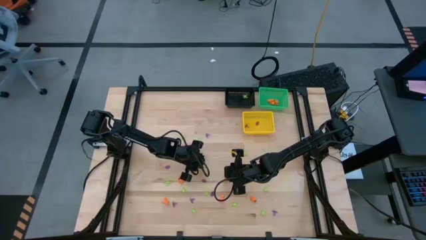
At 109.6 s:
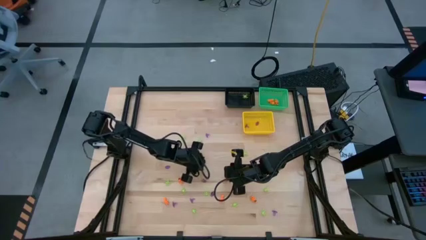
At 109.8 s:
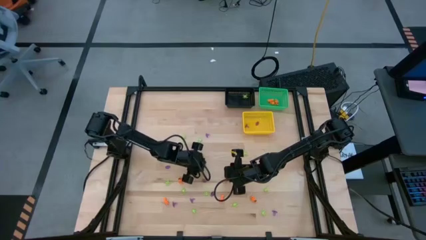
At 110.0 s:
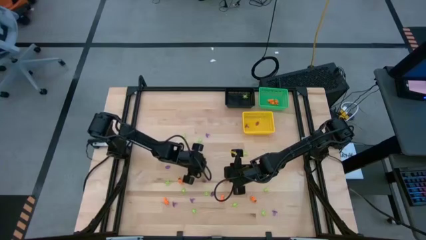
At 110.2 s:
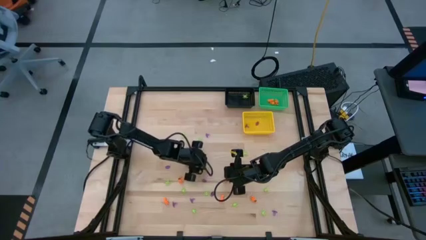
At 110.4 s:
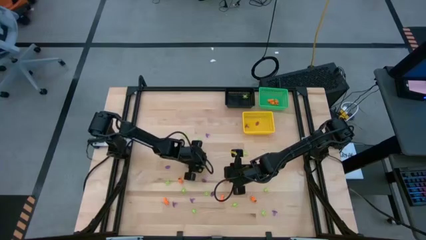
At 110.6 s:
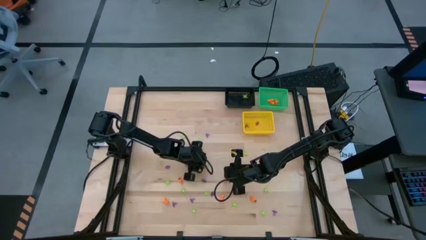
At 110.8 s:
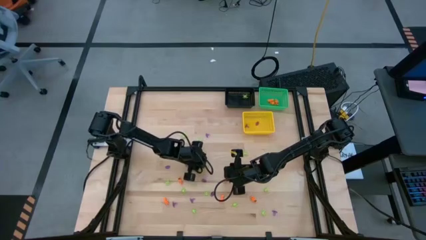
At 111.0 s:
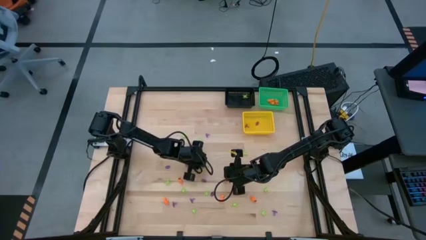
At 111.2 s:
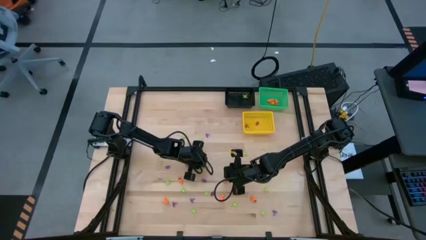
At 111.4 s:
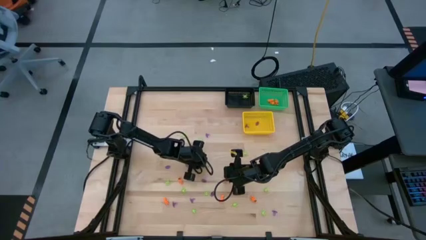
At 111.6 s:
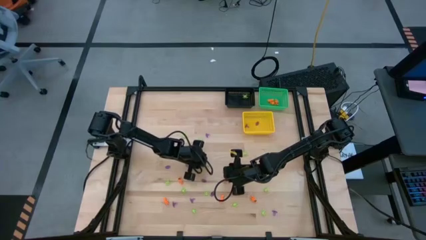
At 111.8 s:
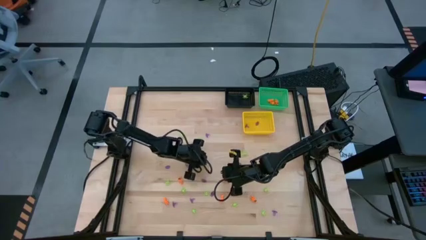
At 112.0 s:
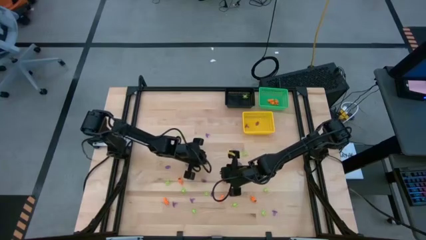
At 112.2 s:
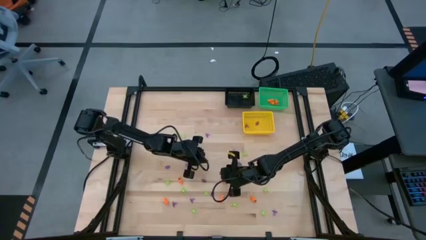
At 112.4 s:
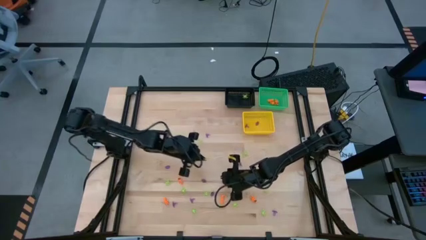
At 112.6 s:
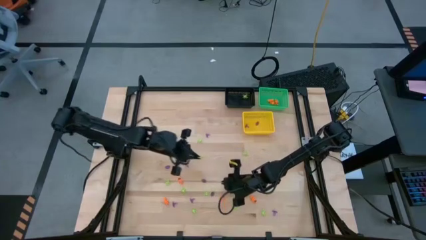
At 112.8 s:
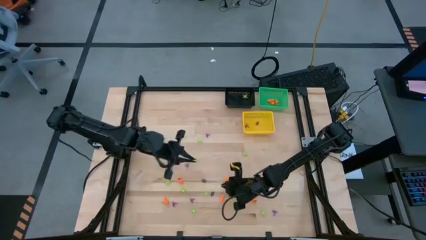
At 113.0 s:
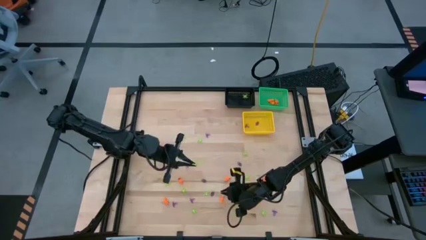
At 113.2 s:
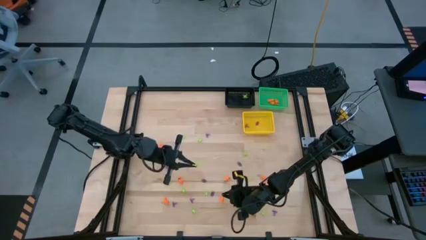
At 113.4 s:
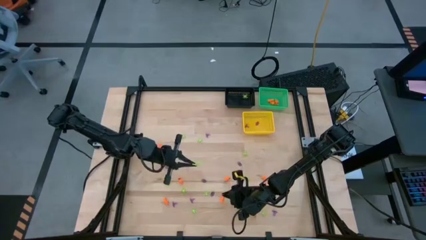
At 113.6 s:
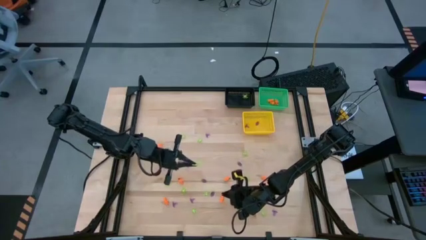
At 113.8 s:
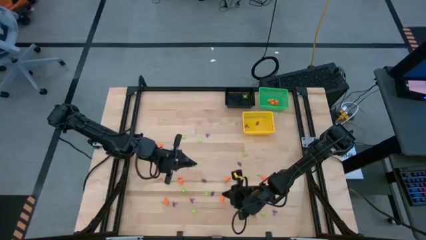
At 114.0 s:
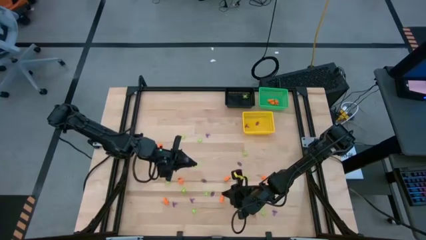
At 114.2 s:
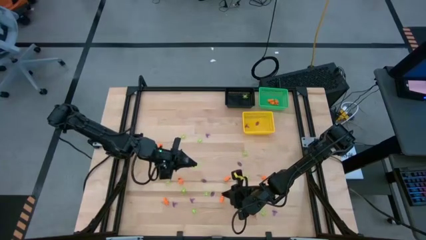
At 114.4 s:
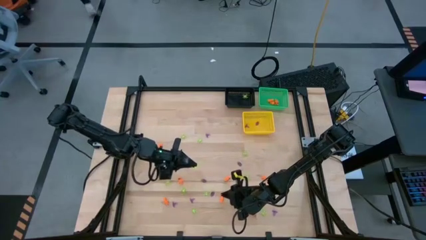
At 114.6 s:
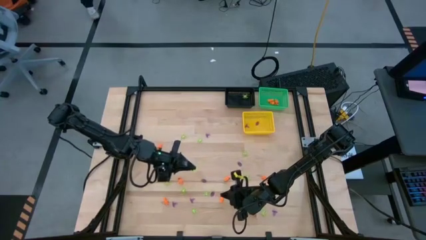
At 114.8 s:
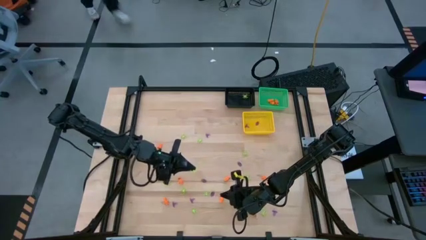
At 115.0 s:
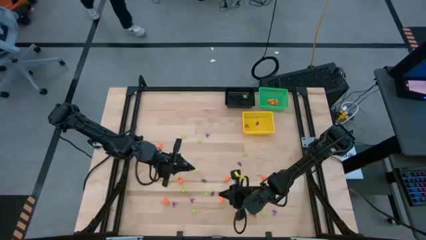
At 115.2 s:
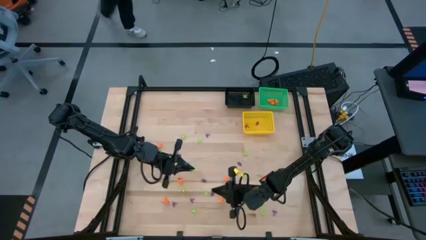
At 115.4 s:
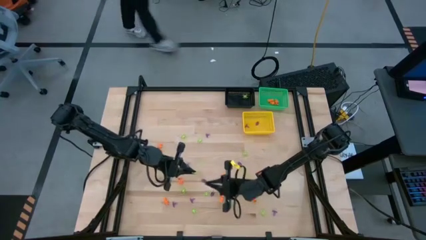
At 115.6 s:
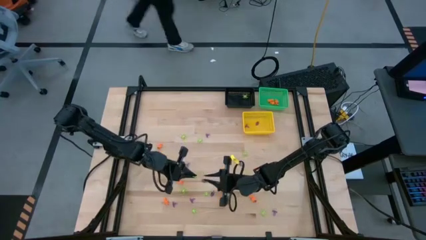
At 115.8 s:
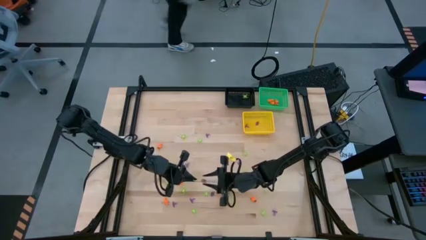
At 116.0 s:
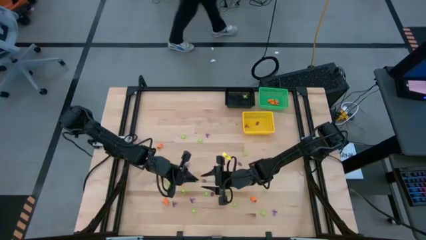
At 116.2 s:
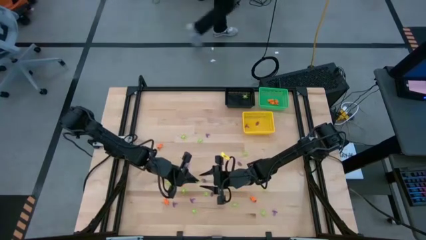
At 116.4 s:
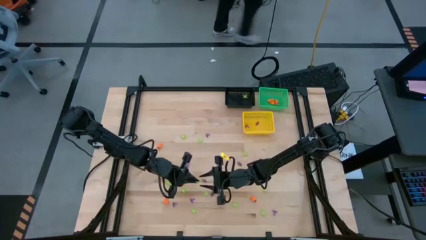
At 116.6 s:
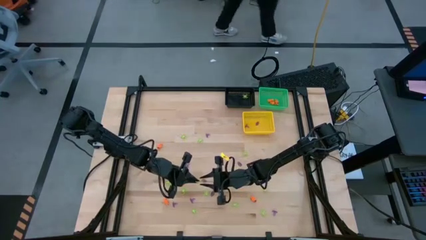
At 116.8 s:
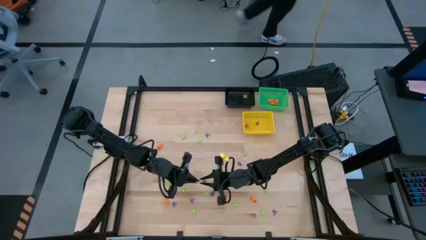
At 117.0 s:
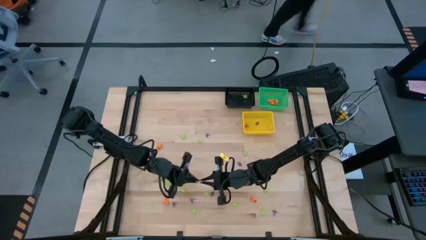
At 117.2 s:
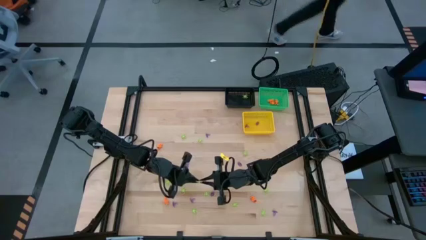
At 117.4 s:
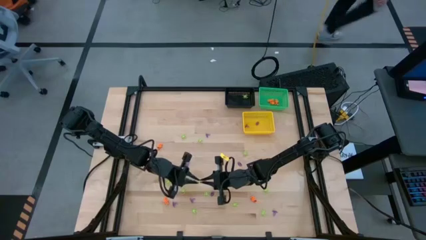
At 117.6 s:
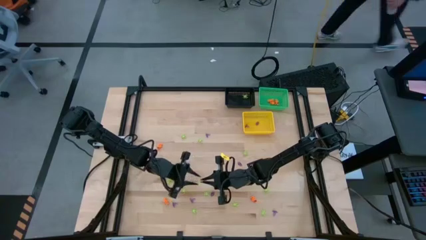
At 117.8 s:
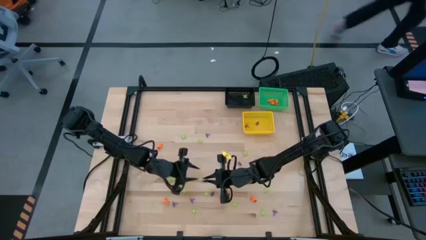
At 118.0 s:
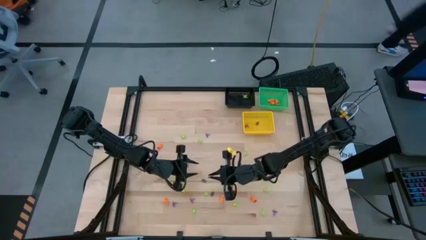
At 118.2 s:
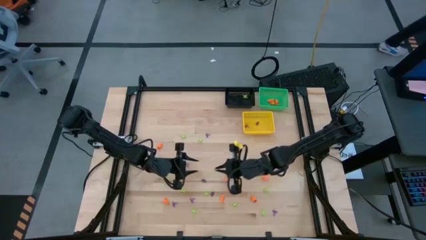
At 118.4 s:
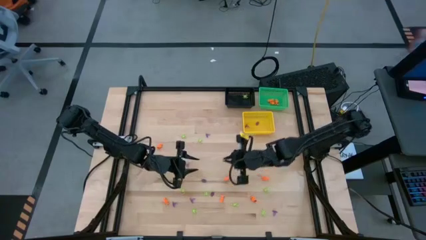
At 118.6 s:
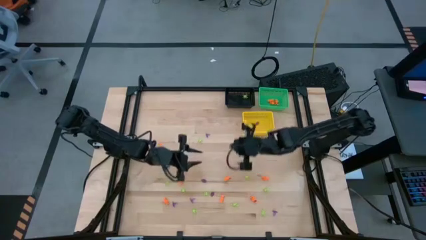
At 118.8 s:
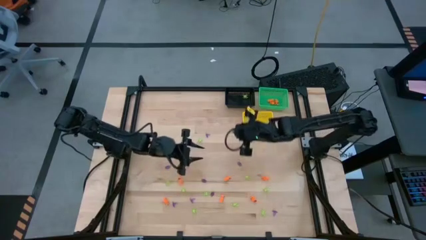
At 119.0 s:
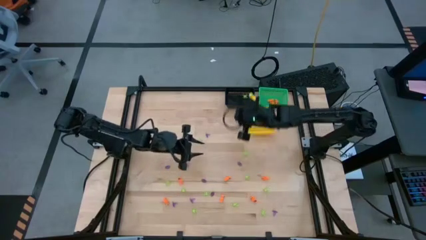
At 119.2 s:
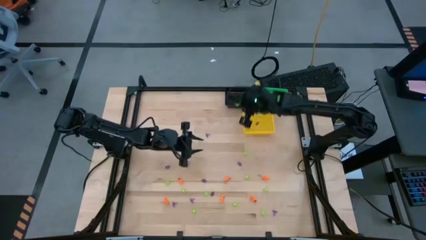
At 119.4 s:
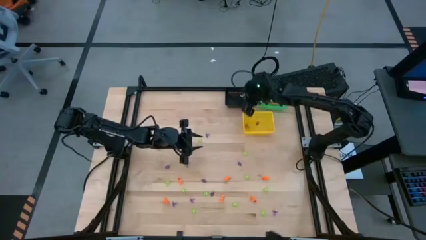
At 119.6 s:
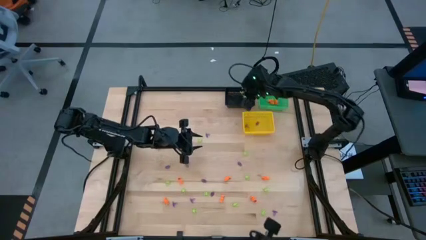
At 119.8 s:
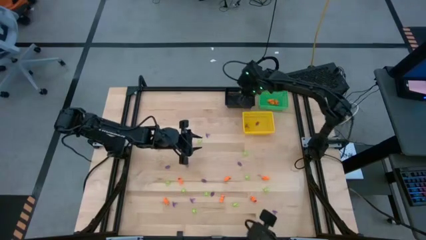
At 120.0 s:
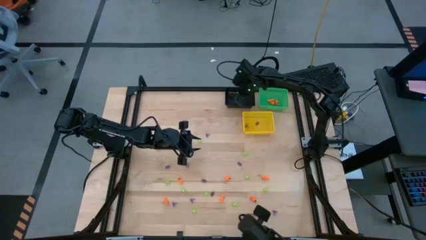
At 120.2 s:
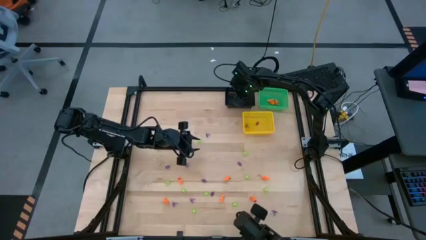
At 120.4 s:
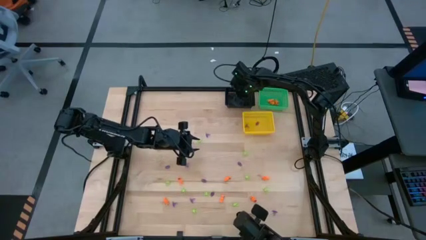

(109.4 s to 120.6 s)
Task: Sort Halloween decoration
Put the green spider toy into the black basket

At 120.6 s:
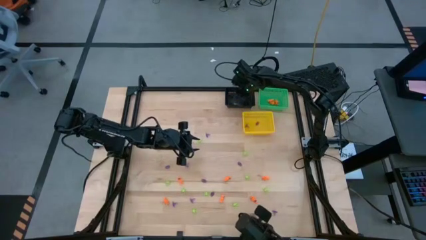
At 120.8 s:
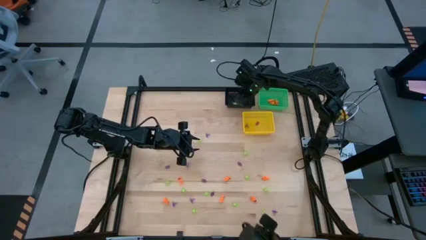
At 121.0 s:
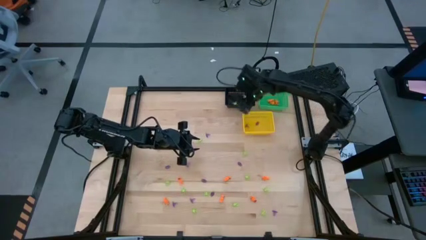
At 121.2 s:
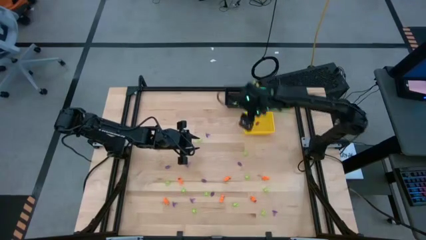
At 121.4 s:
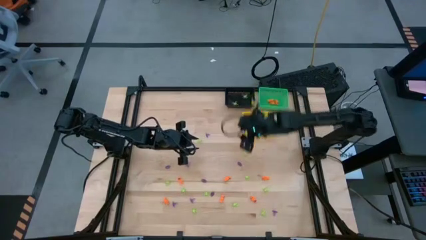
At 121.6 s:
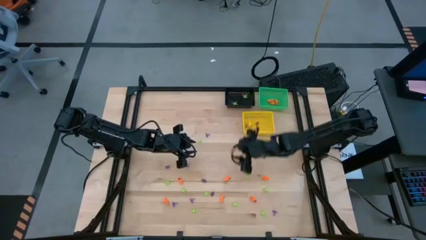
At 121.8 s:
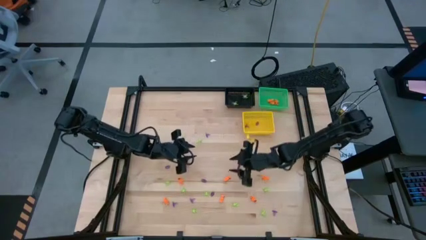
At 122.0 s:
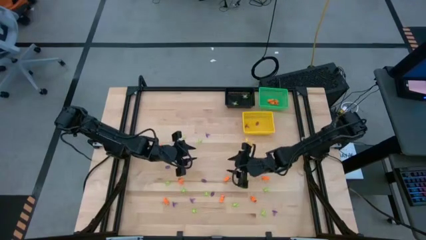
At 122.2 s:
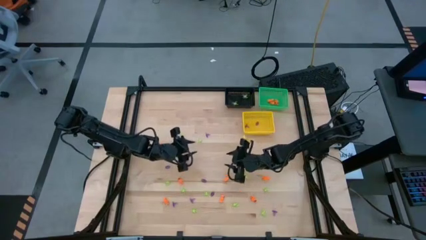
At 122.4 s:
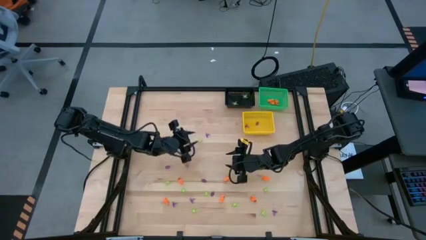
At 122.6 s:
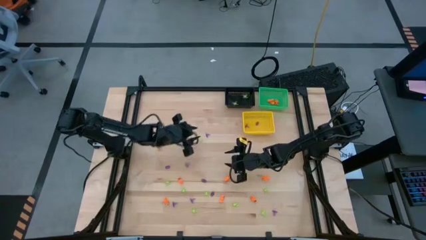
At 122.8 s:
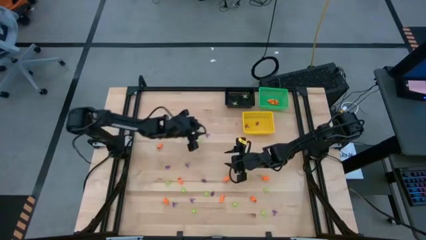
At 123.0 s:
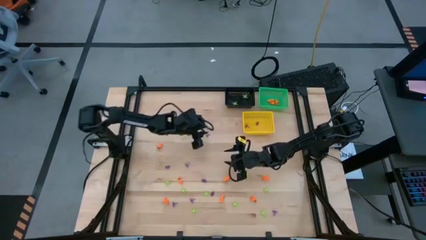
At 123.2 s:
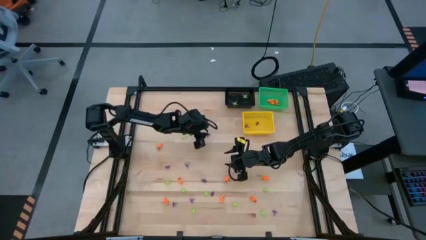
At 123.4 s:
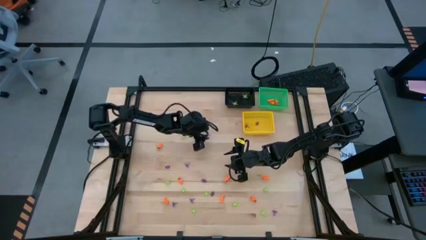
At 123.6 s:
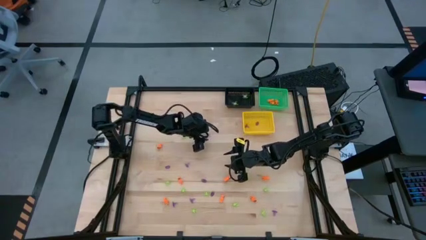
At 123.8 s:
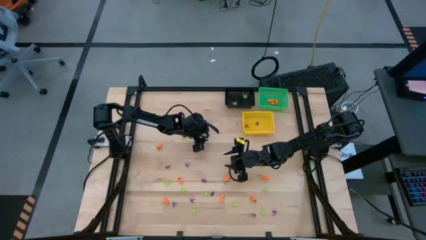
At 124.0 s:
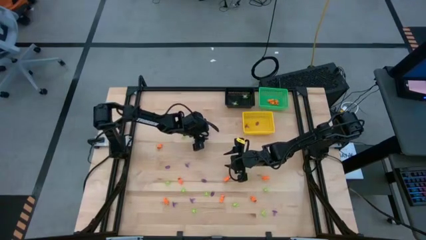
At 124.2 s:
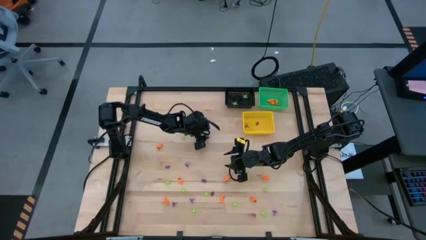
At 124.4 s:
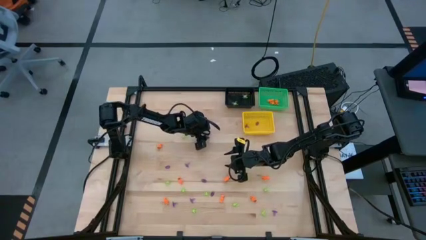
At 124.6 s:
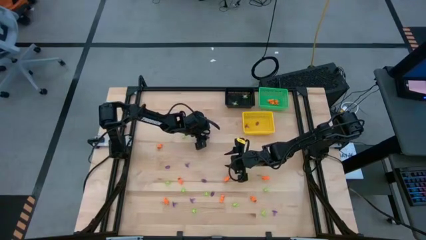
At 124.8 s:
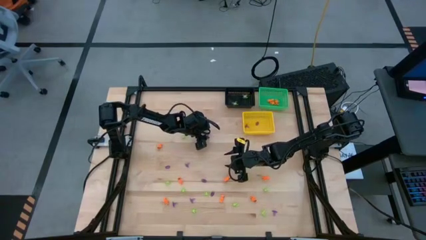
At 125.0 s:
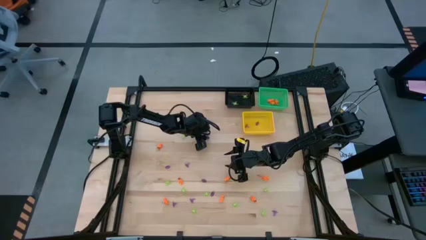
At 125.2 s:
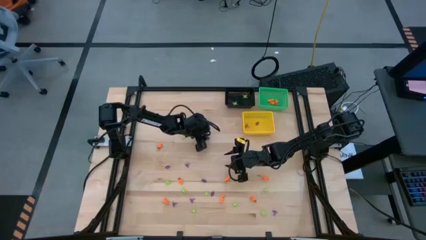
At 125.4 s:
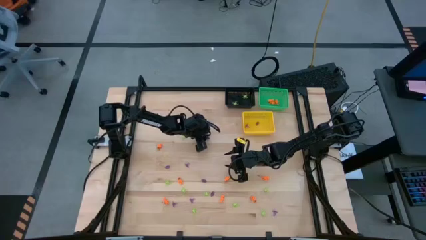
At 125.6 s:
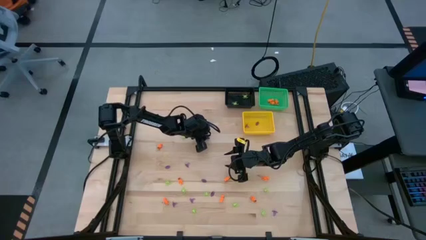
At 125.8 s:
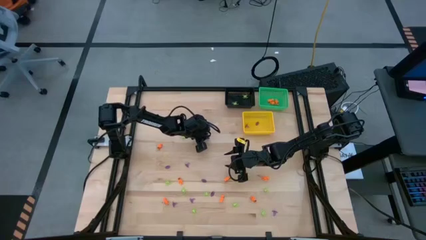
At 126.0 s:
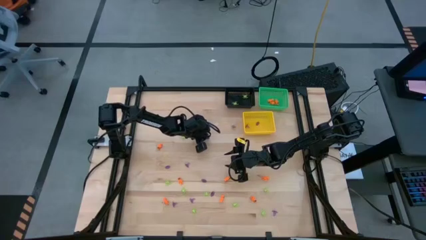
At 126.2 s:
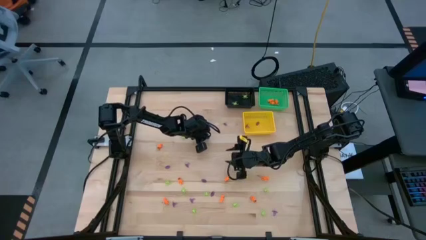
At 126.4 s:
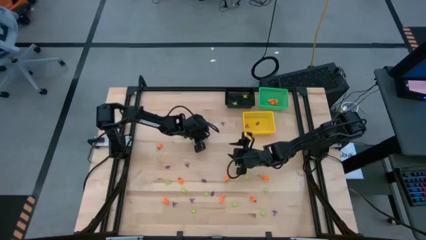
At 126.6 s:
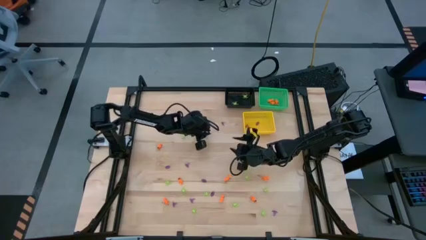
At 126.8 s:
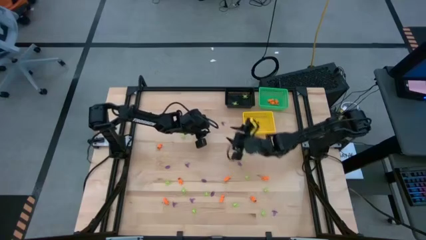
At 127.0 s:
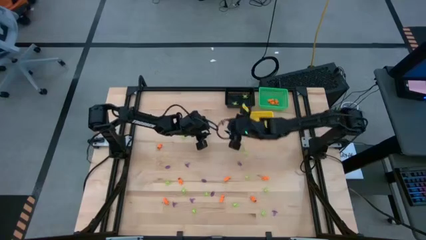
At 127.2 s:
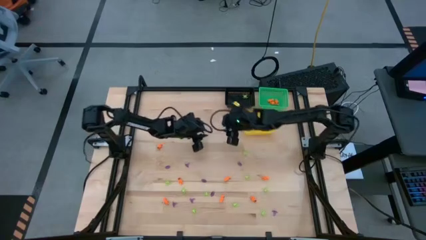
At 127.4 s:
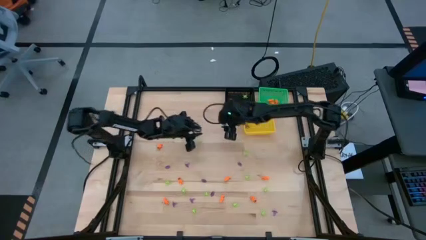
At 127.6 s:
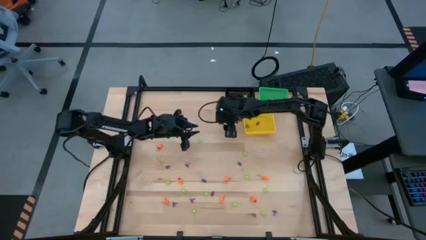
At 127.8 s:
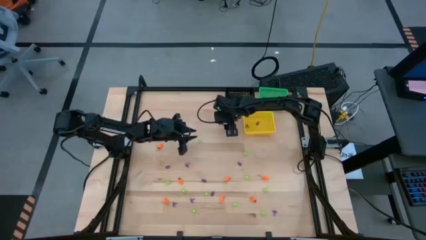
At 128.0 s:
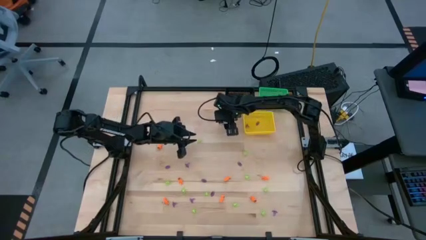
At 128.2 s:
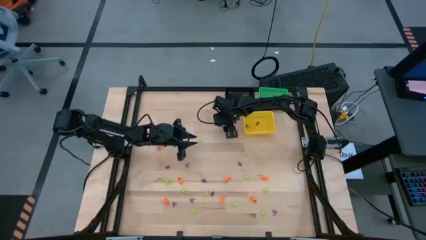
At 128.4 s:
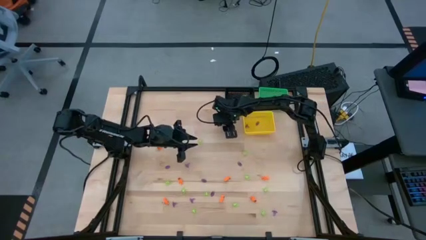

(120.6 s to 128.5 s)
Put the violet witch hat toy into the yellow basket
